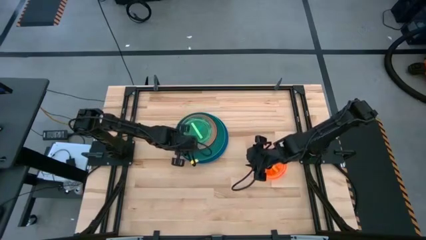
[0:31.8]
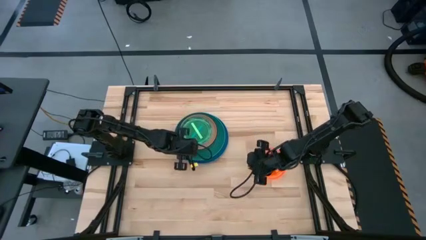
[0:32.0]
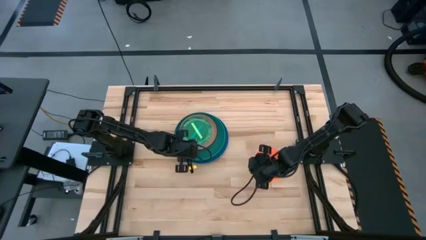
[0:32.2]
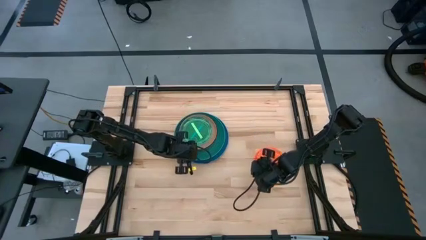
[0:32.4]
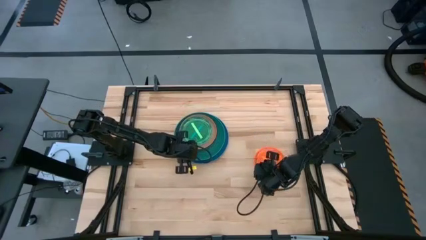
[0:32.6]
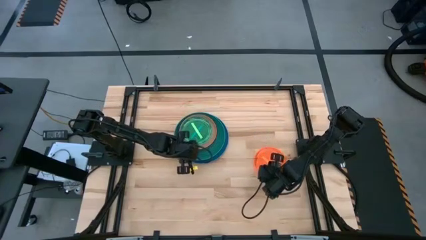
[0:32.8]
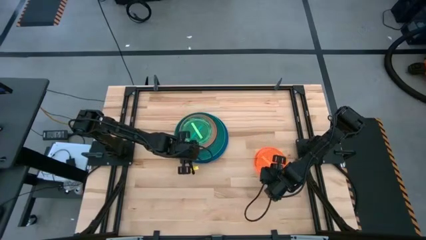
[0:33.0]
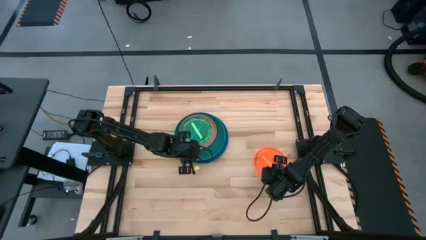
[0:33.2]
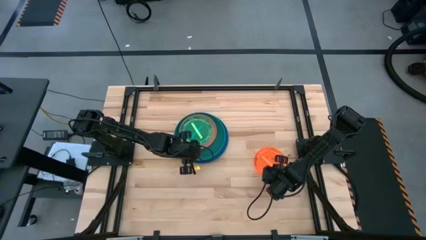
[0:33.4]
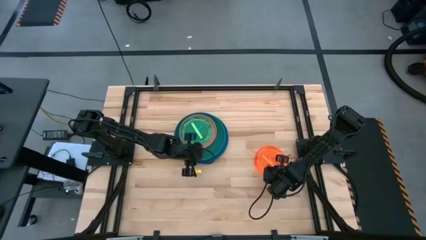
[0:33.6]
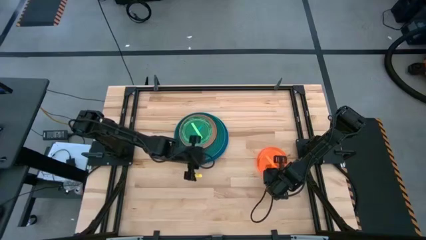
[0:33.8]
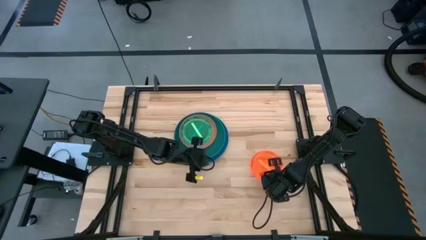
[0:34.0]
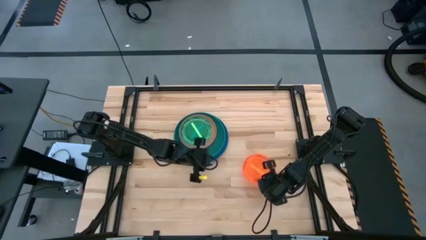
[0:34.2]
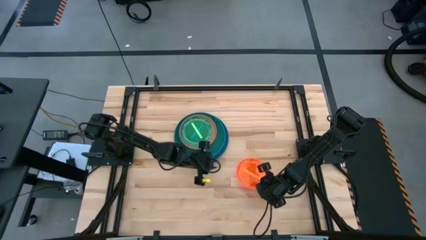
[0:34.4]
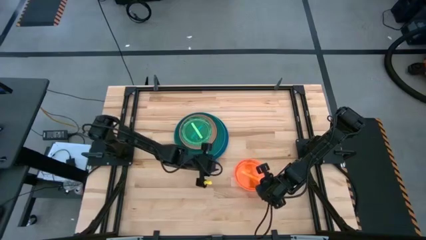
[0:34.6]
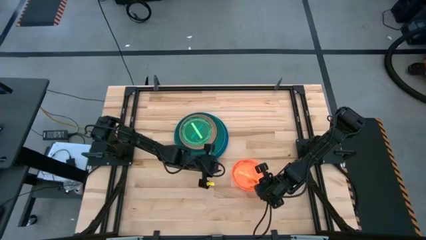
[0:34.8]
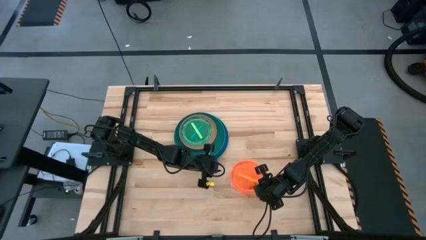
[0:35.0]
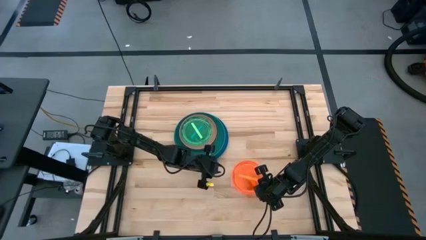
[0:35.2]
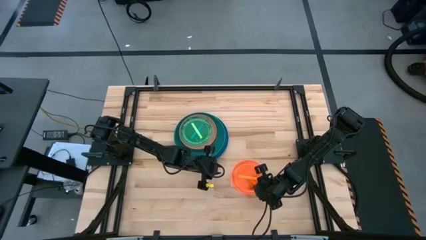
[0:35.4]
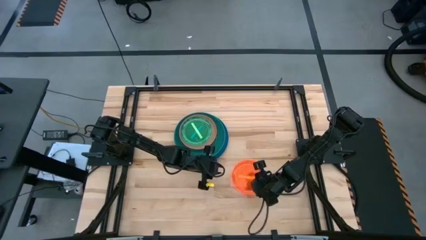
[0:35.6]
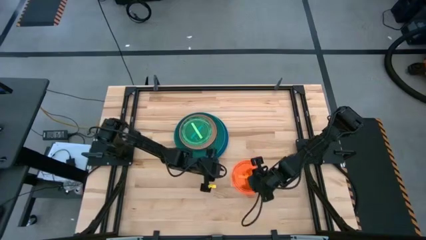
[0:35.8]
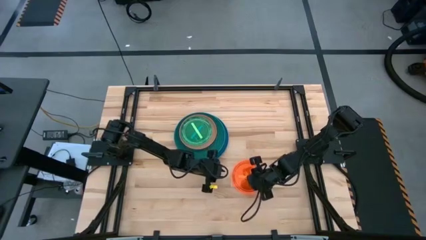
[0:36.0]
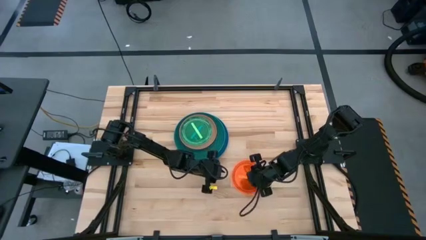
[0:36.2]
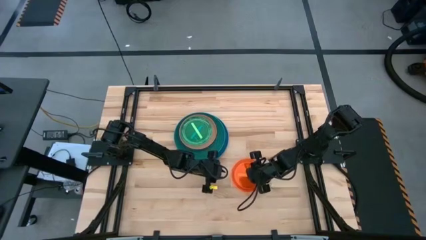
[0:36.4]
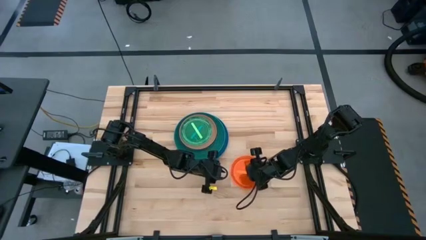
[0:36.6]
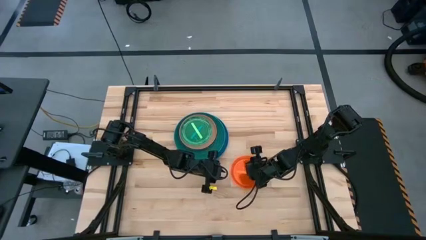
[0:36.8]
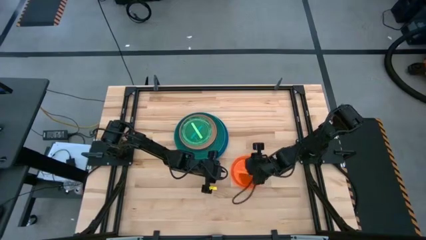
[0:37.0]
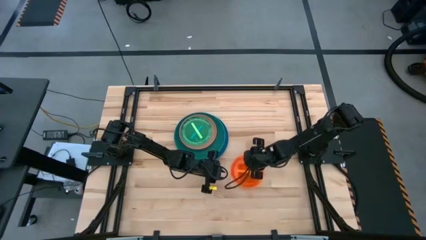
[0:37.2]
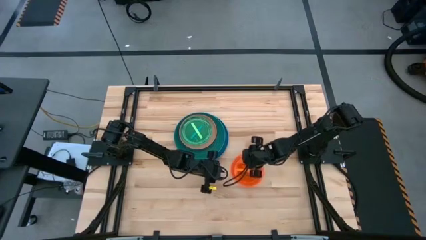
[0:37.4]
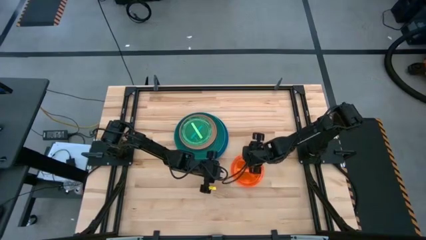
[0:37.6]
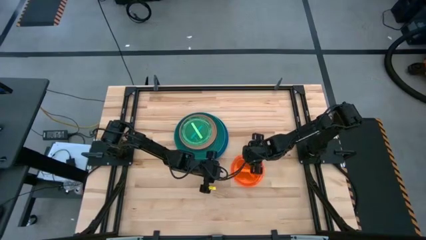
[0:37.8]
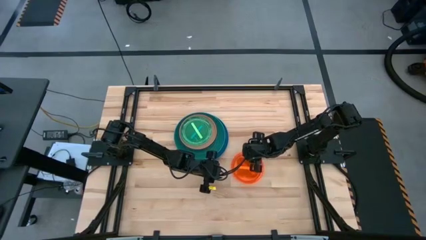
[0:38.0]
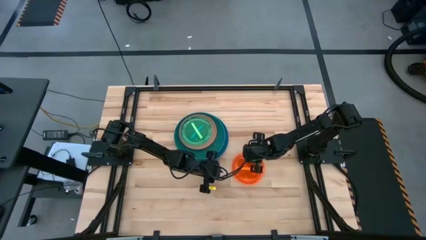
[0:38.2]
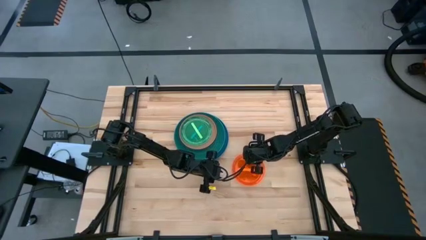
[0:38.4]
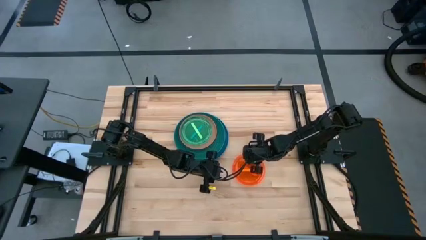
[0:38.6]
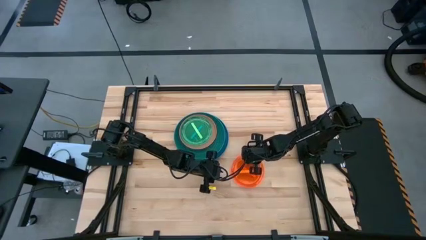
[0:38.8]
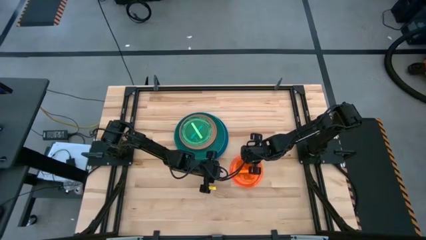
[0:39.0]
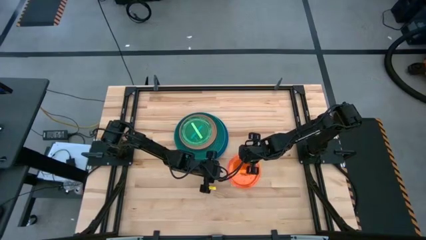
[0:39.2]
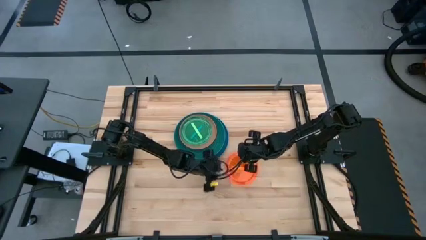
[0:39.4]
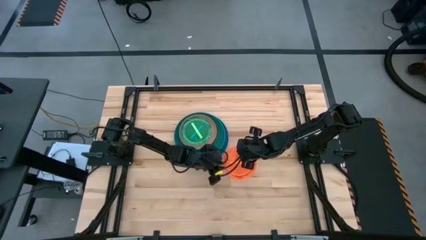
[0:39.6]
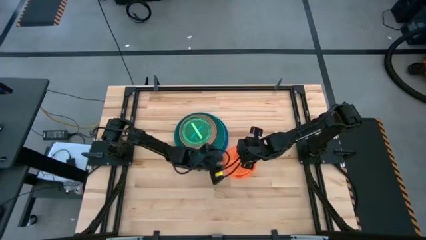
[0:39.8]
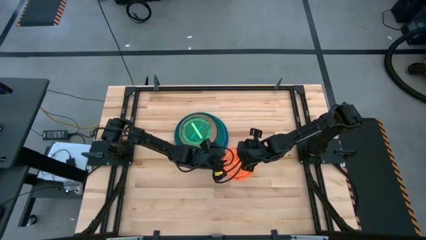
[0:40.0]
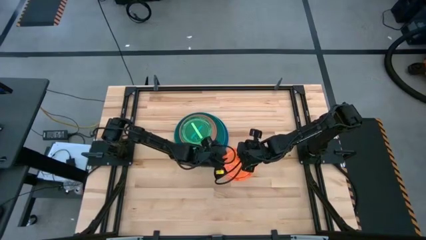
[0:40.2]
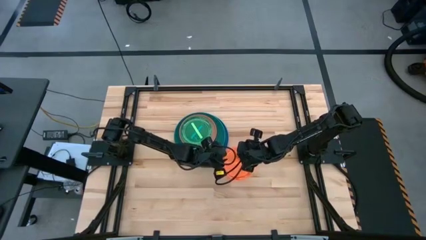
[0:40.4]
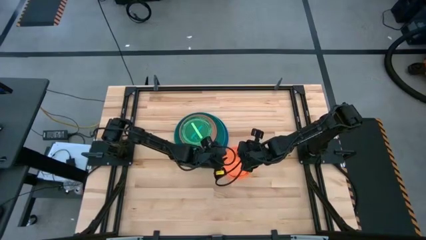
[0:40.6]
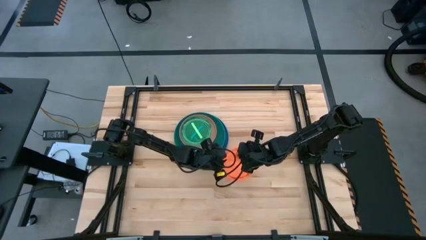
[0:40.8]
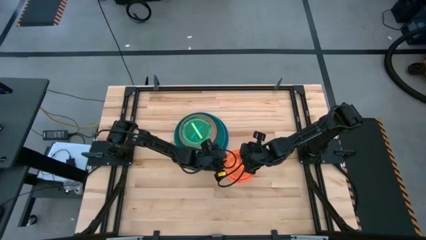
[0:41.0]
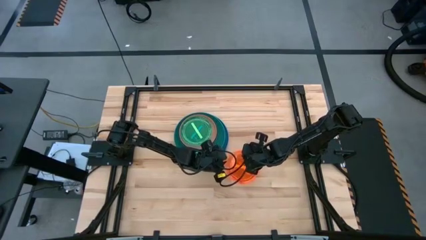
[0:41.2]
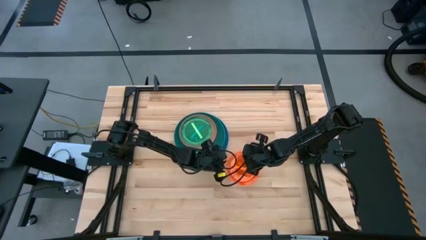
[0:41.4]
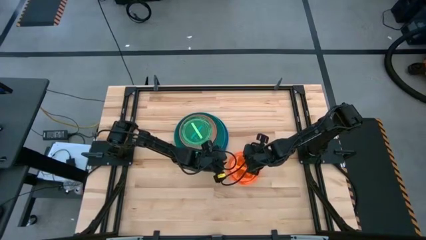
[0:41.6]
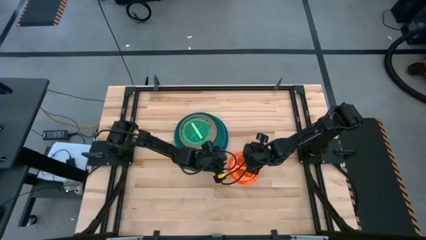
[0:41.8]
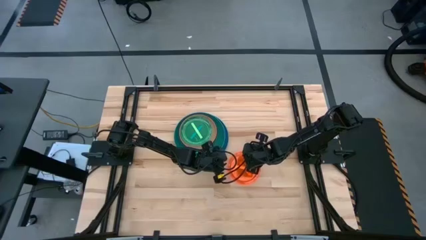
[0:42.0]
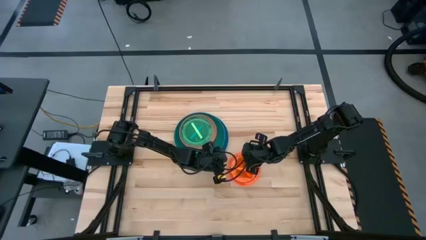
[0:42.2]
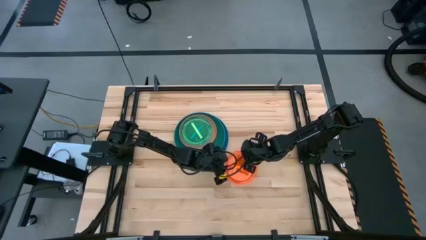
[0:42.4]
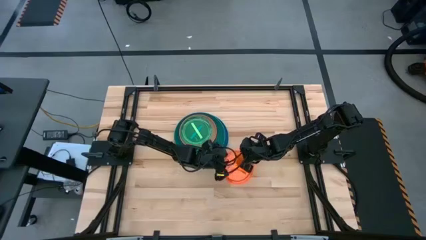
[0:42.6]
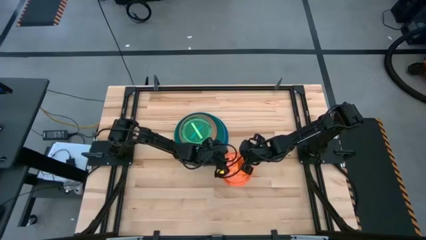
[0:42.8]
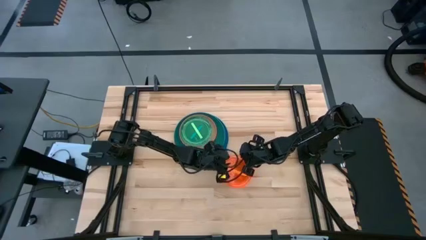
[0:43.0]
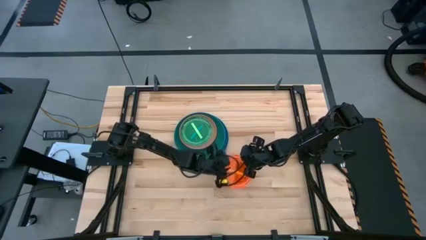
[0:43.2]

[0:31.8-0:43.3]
Task: Stack plastic plates
Stack the transparent orange plate on top of the transparent light green plate

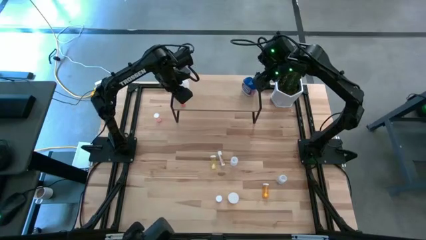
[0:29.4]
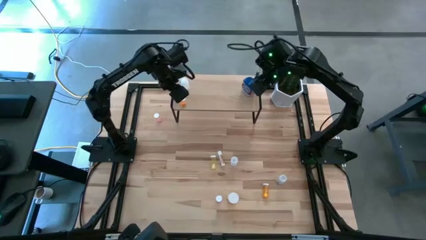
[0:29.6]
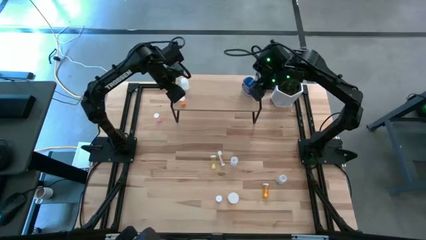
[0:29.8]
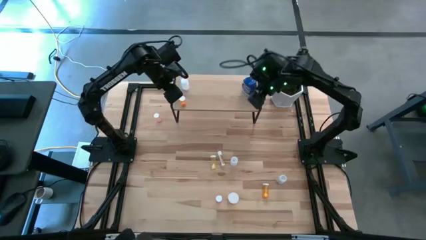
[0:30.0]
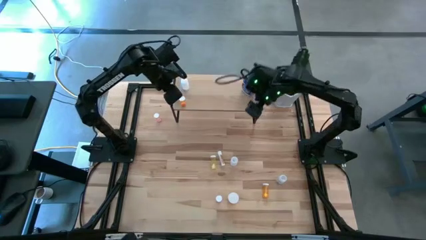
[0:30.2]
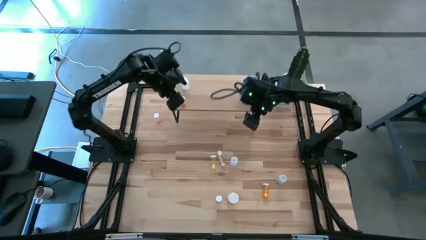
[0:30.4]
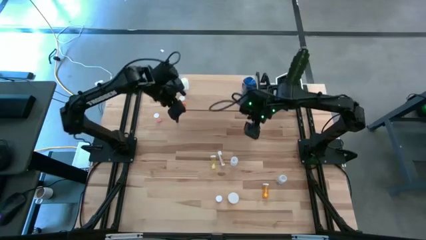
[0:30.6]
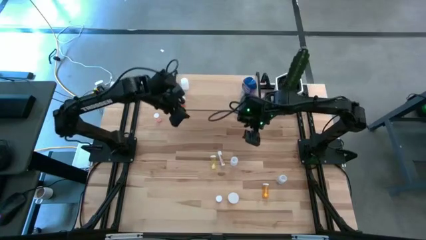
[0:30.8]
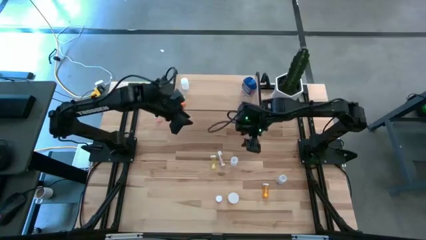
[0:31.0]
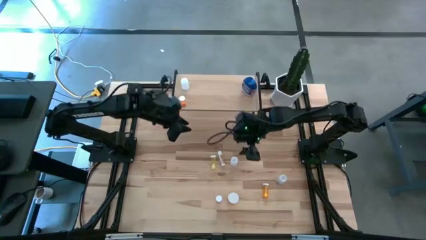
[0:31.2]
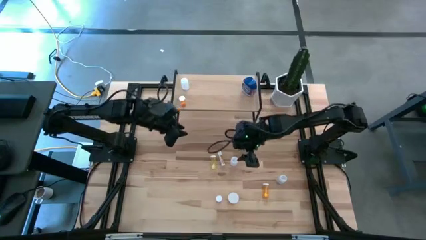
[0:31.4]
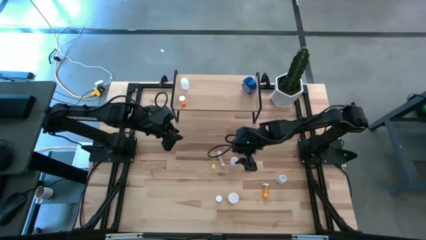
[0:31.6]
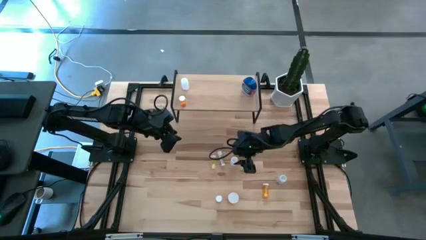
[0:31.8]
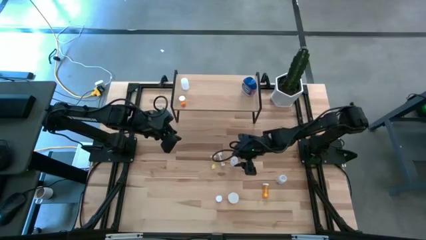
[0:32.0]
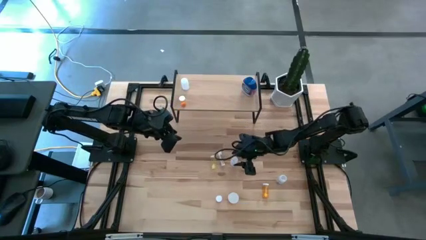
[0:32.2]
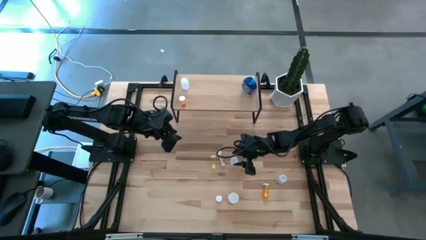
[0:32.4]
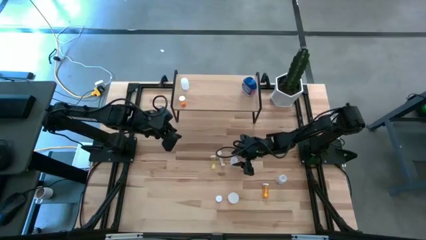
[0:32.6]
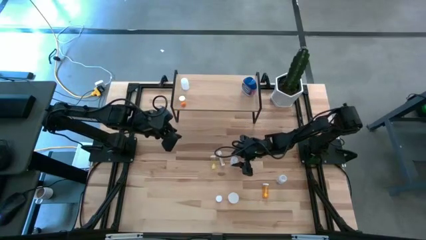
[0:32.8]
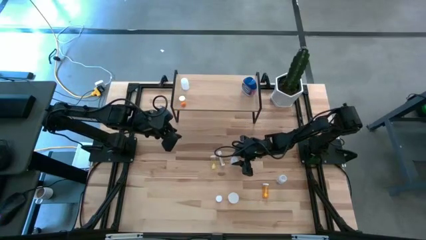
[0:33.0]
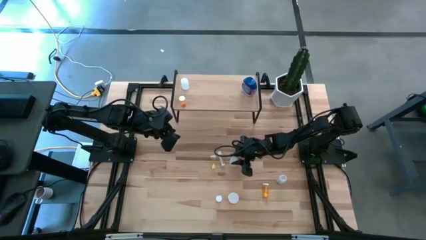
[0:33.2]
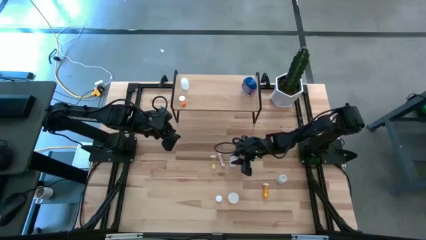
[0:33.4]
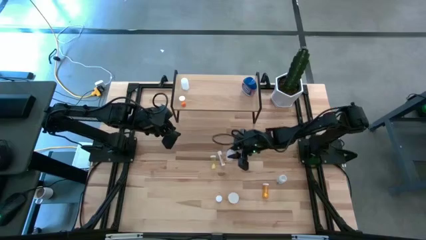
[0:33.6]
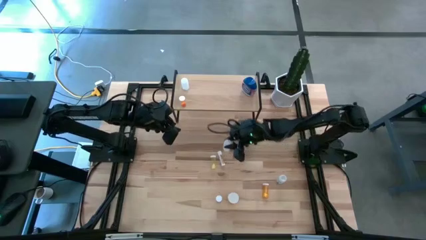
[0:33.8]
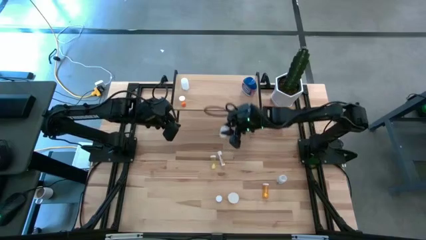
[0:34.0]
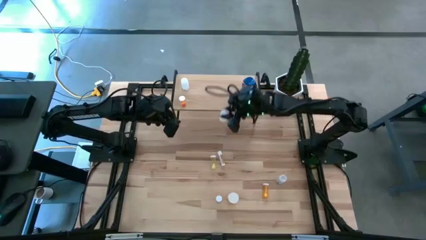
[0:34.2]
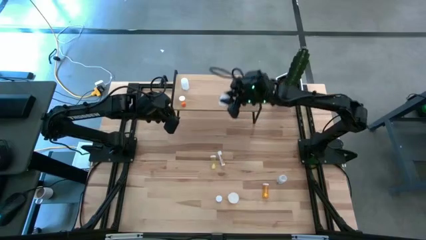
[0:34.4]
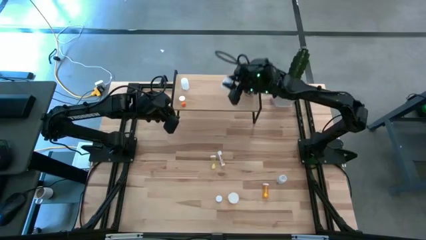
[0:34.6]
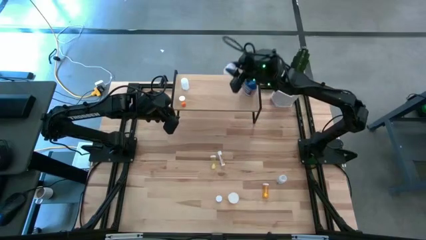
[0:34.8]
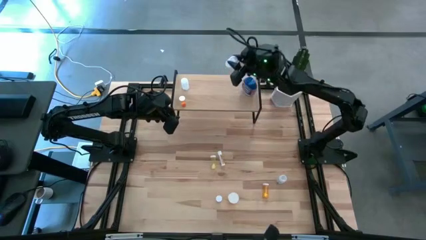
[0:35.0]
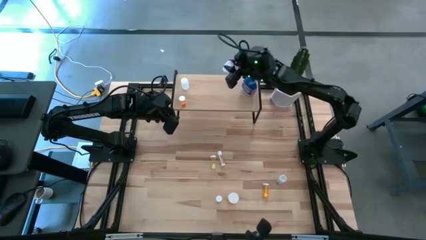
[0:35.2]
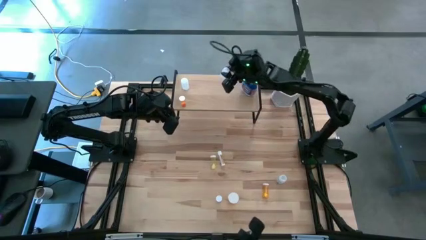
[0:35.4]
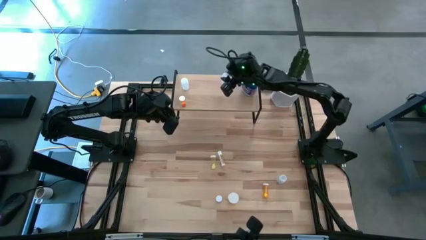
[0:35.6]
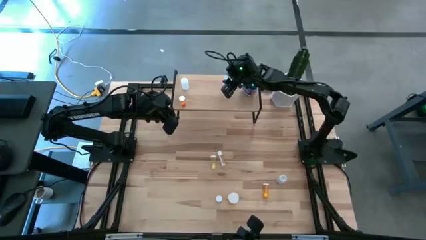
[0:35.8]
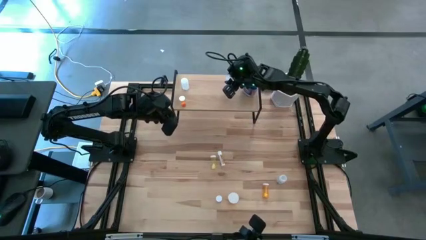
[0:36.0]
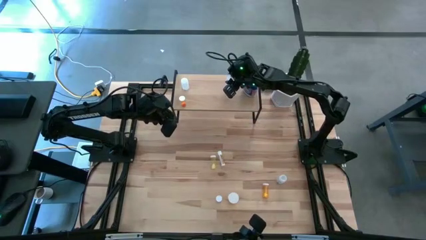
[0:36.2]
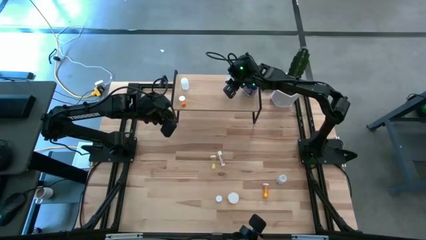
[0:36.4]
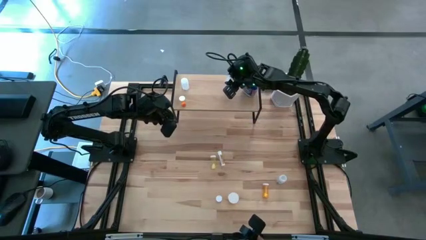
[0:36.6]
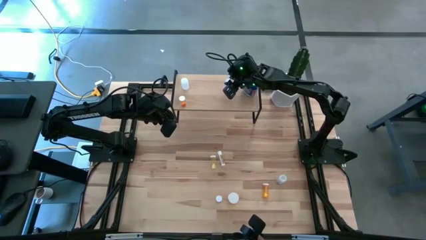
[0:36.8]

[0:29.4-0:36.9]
Task: Pick and place medicine bottles onto shelf by color
Put the white pill bottle on the shelf
